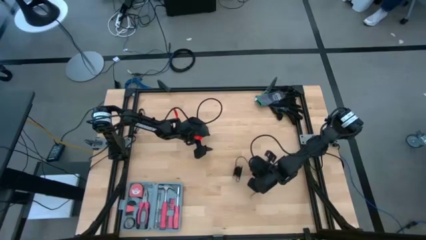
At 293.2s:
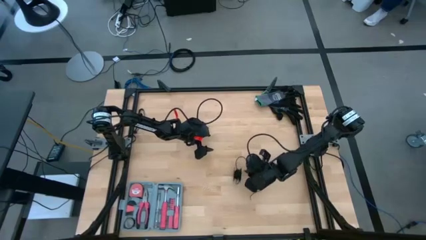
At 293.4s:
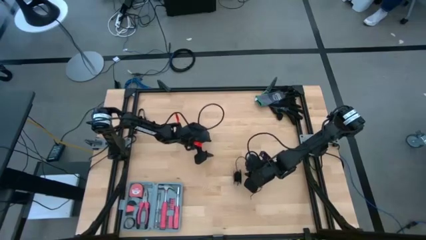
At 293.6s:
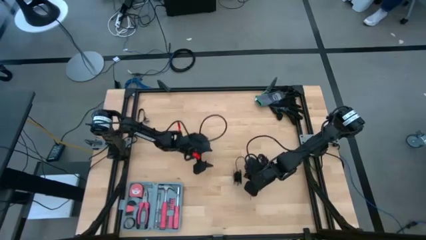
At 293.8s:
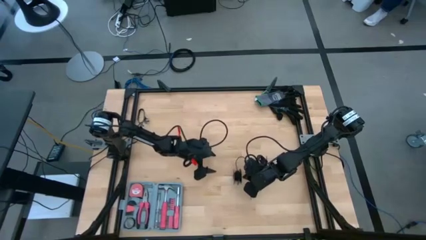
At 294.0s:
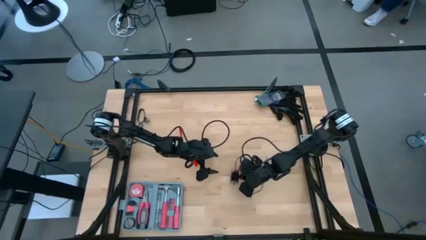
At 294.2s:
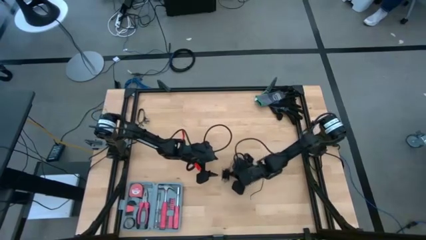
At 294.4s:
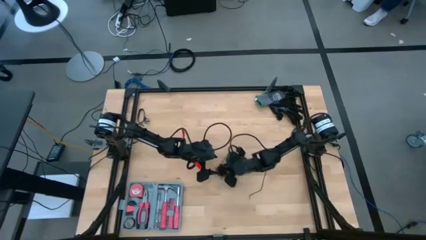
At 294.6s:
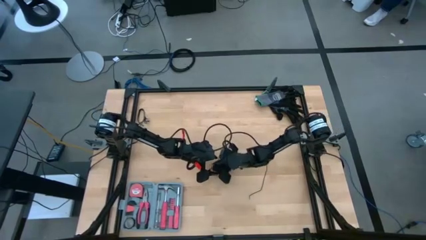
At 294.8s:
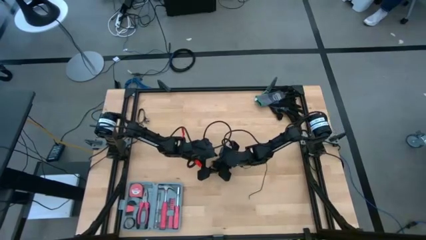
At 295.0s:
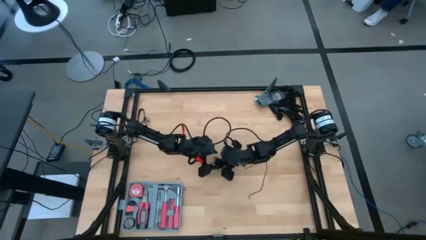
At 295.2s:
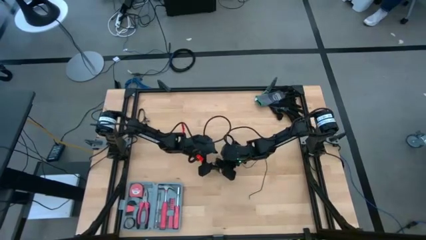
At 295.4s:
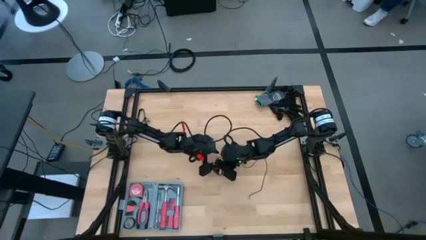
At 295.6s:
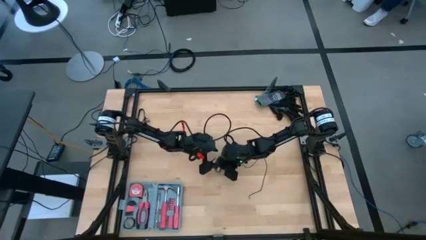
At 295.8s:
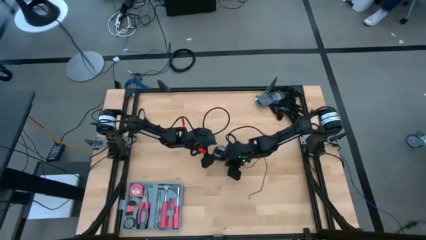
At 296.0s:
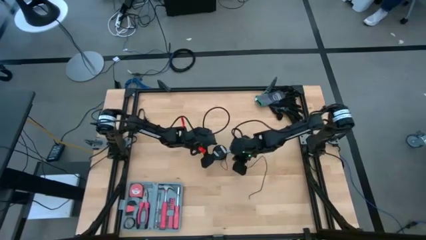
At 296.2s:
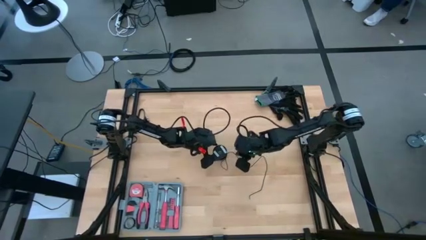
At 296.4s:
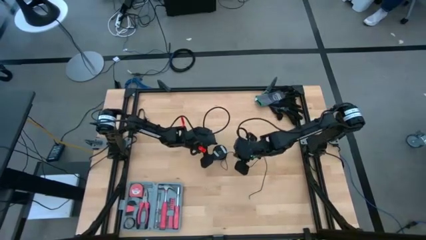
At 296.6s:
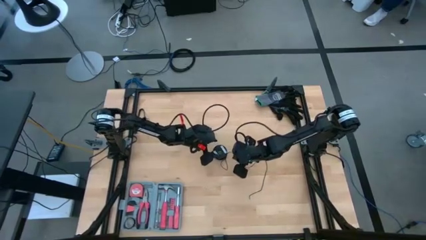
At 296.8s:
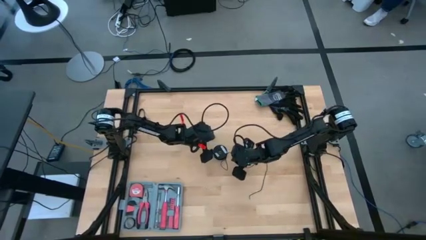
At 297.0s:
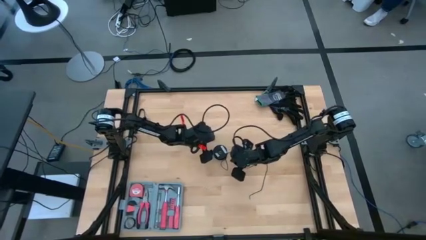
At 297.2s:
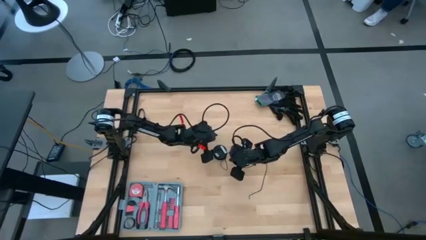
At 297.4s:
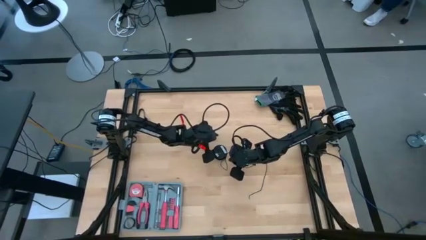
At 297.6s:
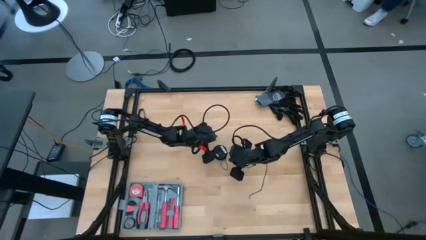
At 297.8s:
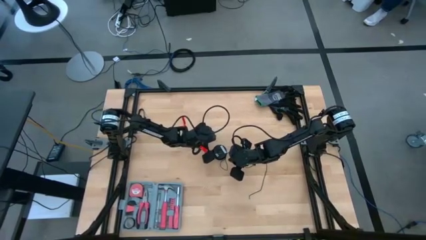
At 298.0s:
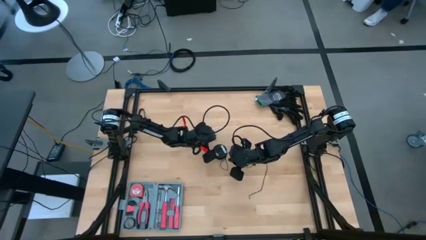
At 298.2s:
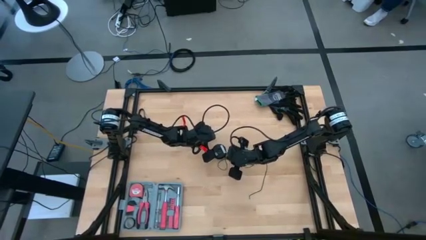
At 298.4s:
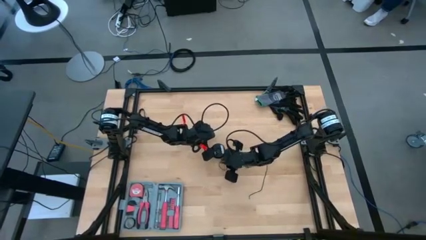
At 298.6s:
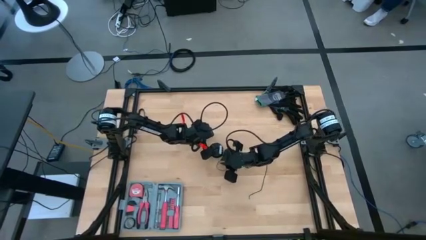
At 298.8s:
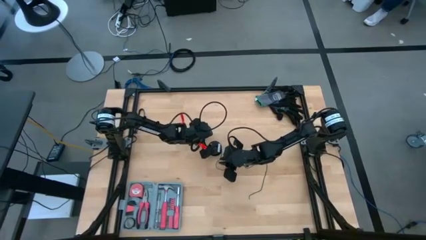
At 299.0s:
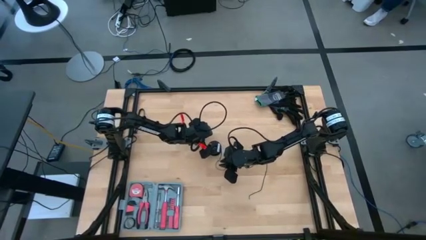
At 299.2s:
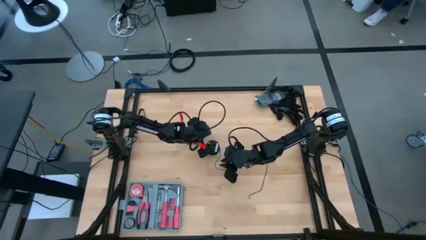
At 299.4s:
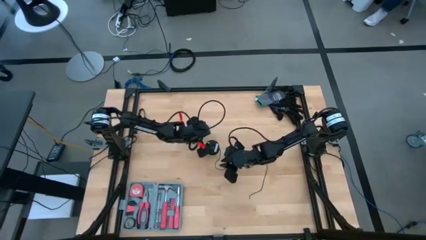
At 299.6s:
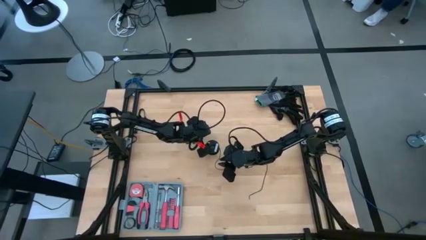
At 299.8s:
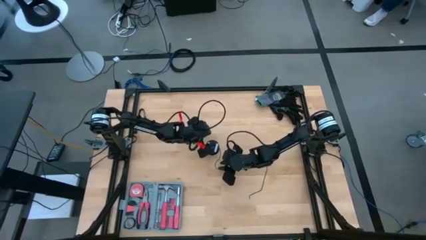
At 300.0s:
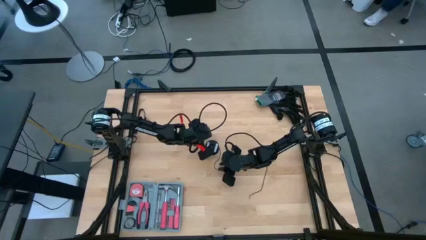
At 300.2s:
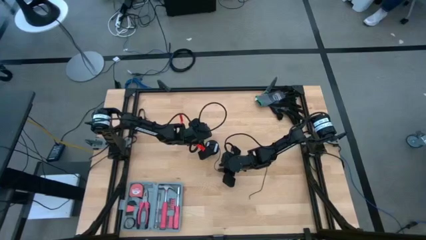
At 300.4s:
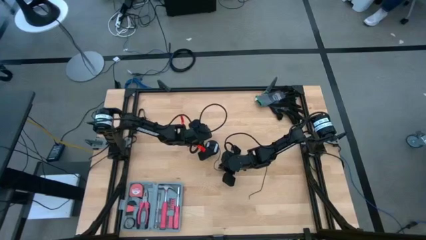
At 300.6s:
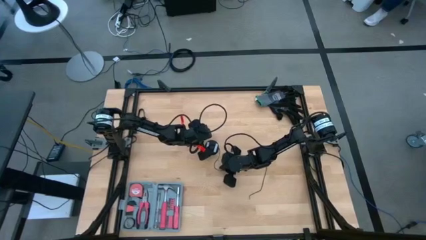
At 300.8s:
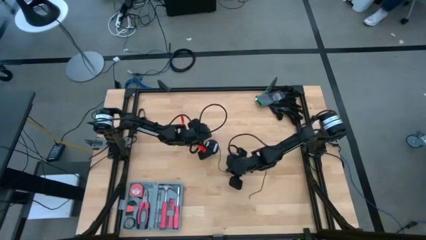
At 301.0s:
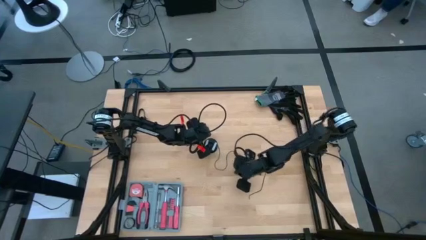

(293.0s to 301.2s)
Task: Coil cords
Uncoil the black wire from the spool

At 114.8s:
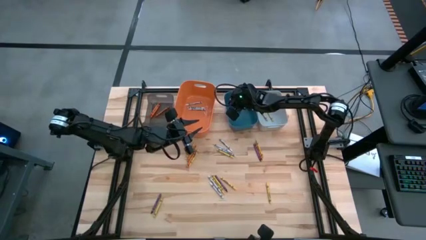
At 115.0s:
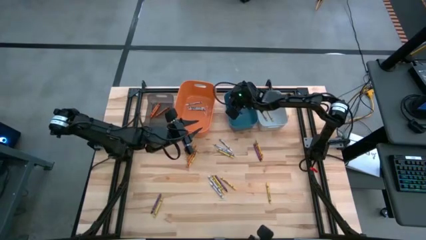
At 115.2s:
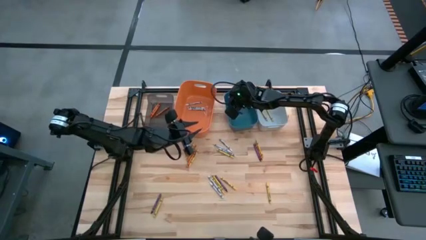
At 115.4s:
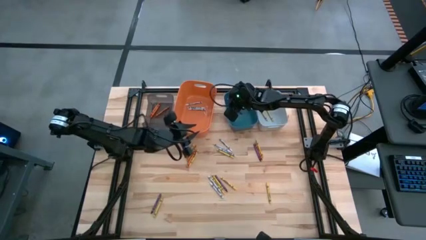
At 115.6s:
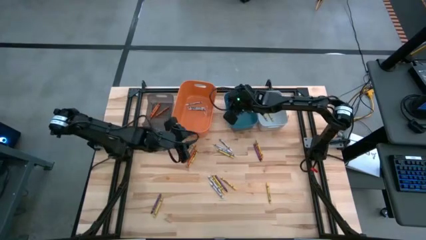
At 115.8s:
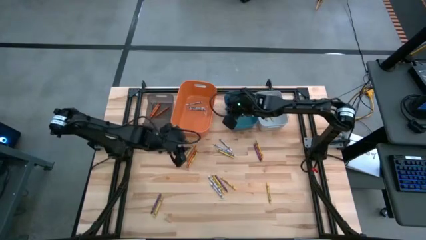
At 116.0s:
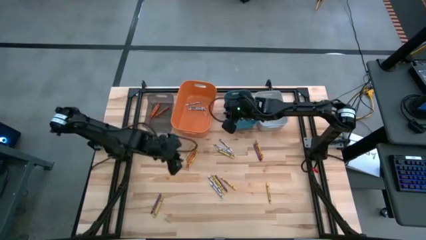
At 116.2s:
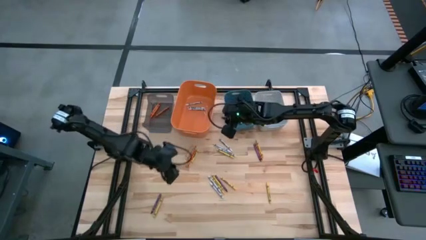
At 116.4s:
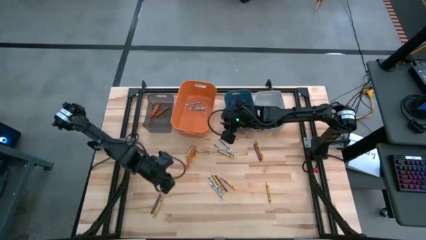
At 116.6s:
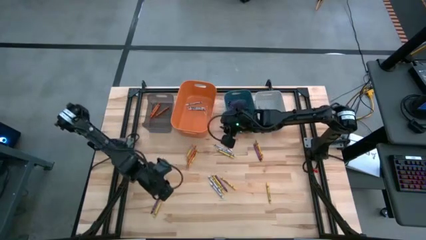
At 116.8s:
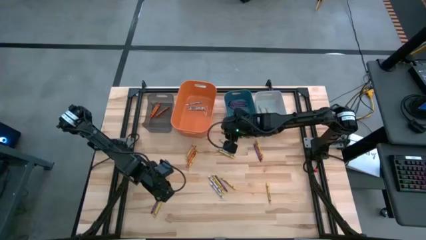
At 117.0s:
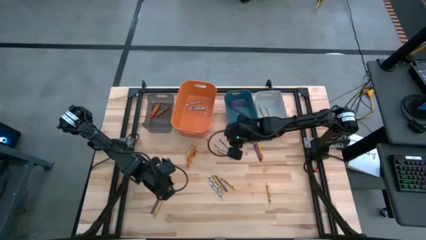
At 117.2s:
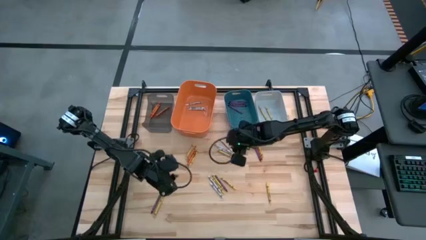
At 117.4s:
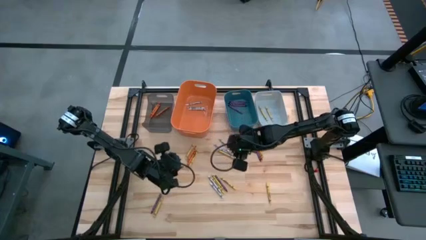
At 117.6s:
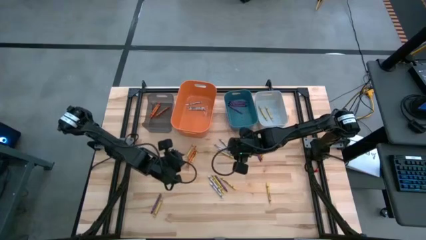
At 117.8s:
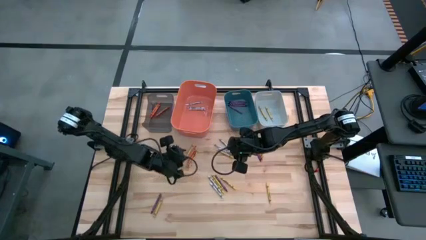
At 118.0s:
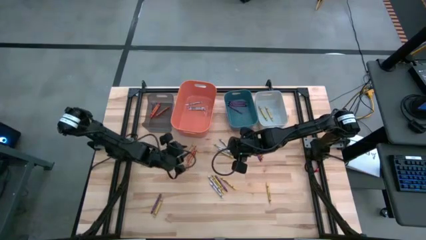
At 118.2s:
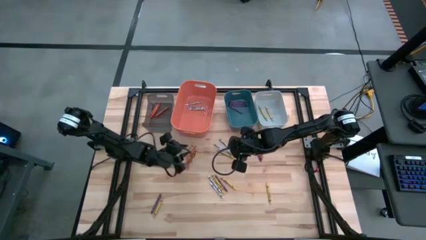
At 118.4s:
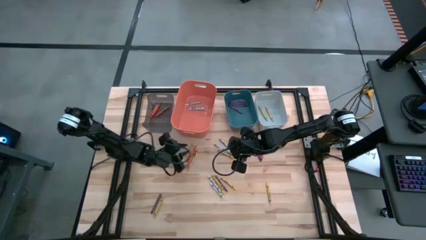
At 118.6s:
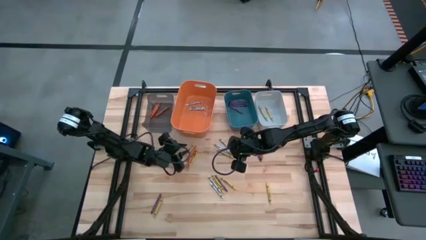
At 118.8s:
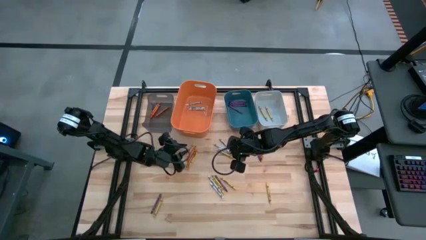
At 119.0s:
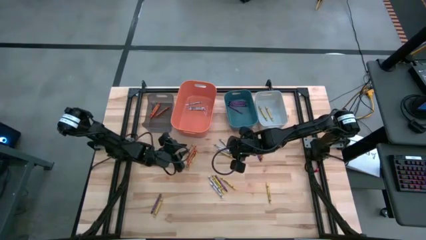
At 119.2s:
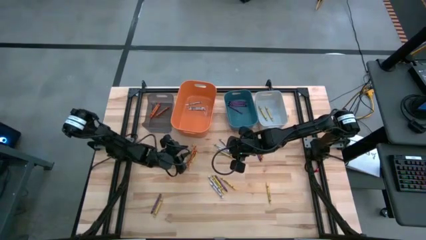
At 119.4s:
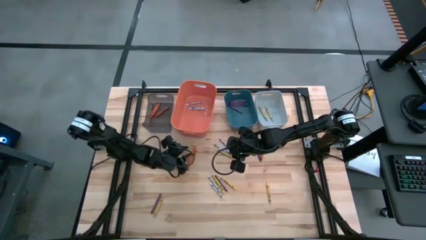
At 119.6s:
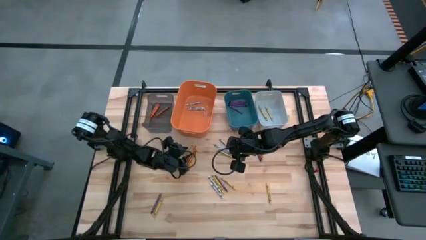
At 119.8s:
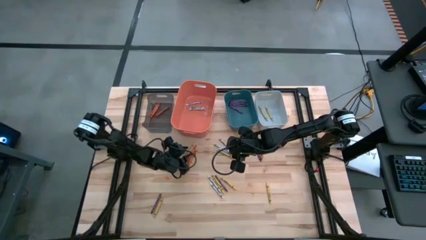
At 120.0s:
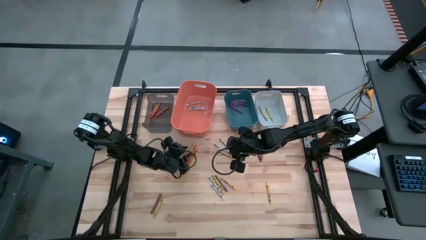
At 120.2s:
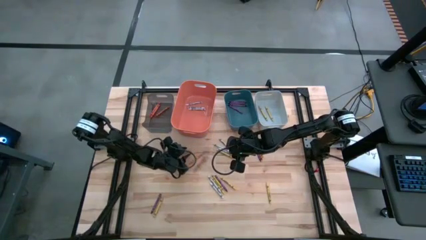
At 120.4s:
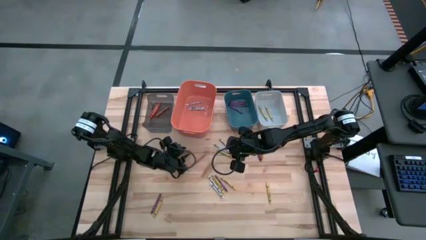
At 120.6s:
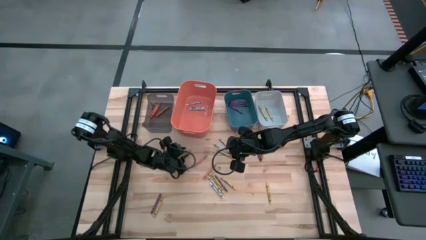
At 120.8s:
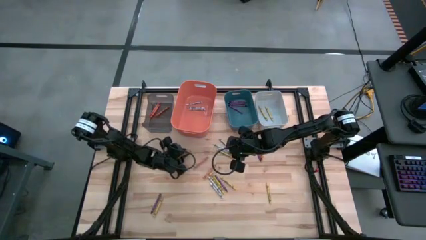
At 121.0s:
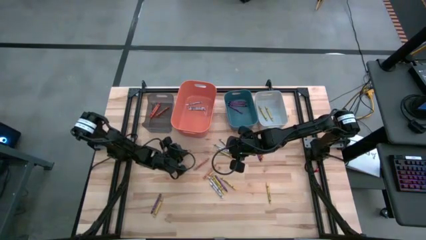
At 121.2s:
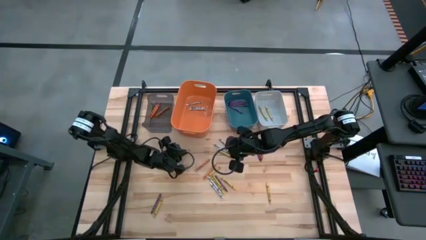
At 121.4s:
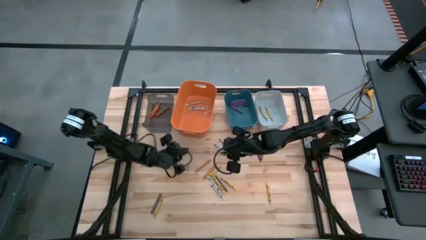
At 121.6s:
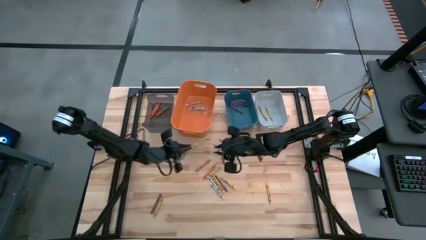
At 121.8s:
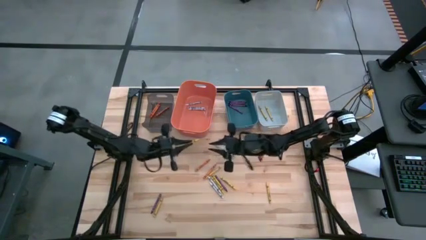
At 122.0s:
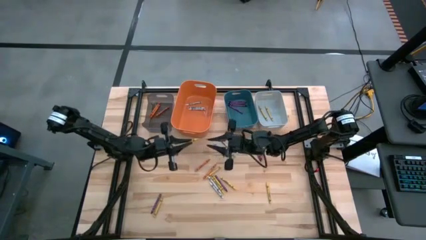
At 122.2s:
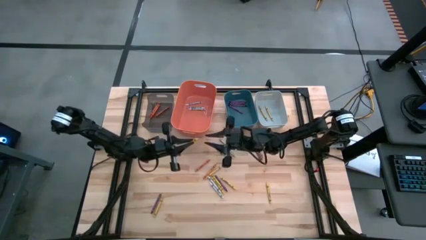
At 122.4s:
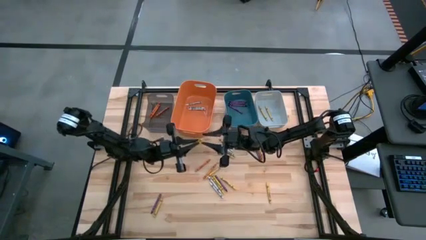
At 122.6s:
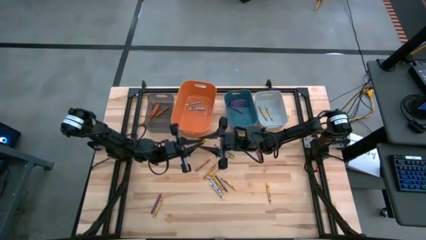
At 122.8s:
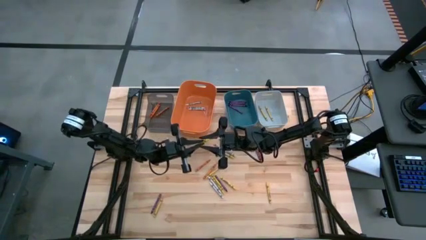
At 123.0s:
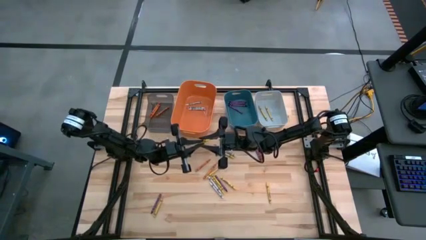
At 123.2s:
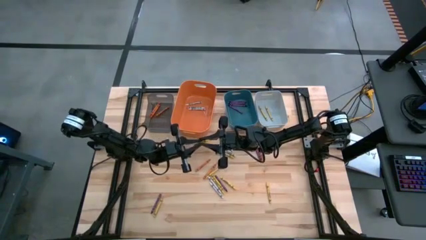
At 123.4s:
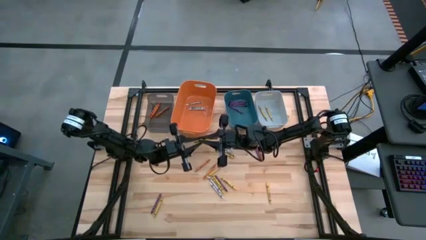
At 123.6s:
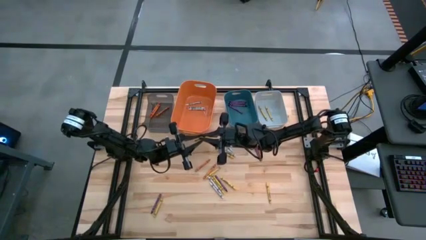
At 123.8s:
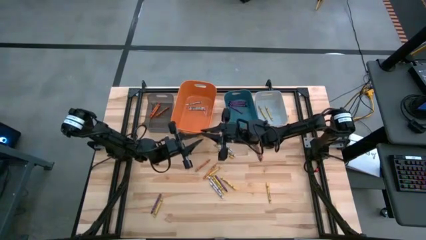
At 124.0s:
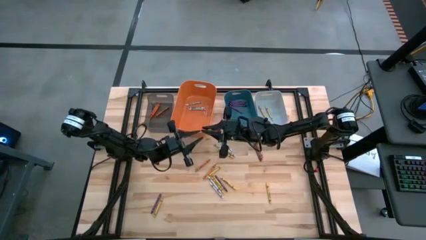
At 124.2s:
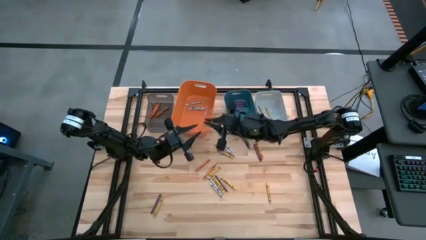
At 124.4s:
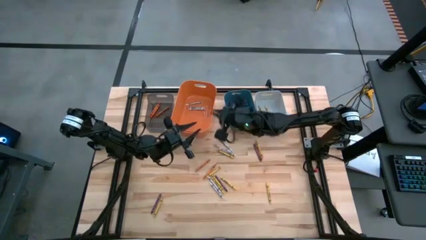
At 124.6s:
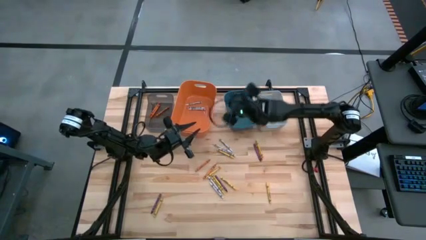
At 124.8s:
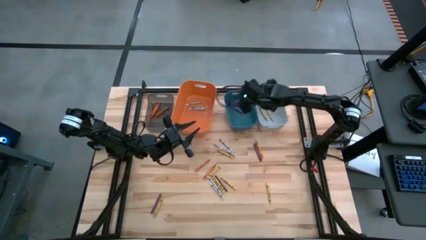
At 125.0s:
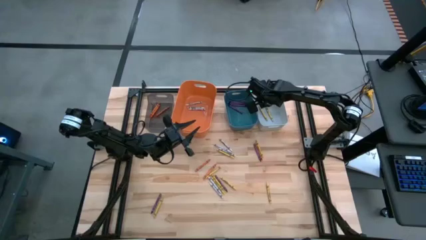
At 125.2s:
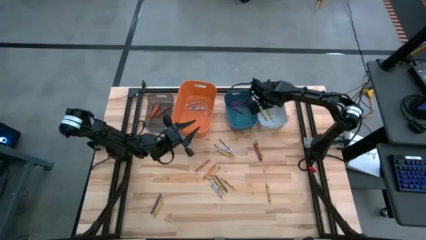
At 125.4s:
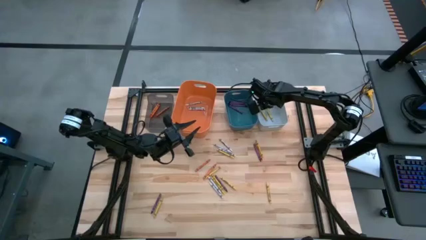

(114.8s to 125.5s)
Task: Sort crayons
Put the yellow crayon into the white bin
